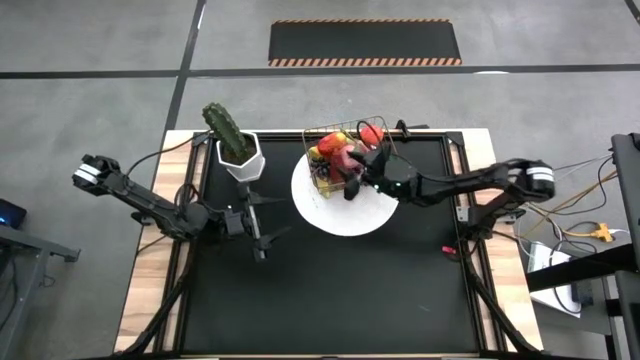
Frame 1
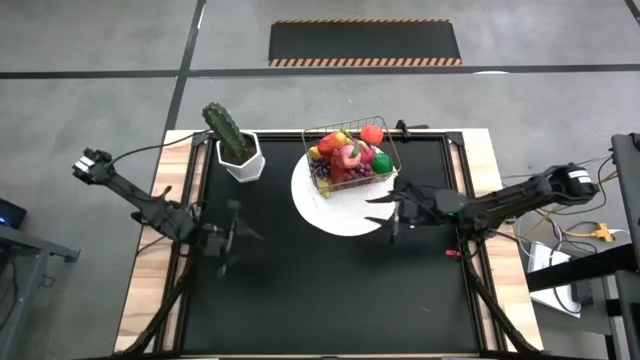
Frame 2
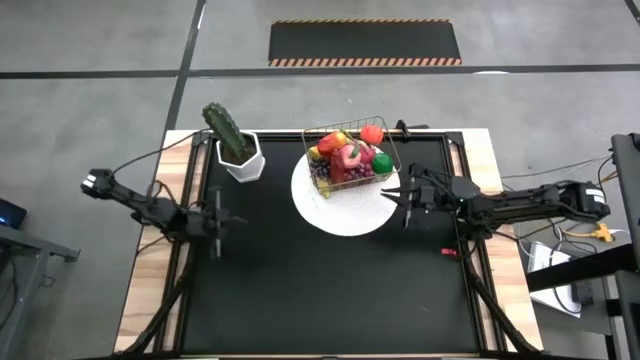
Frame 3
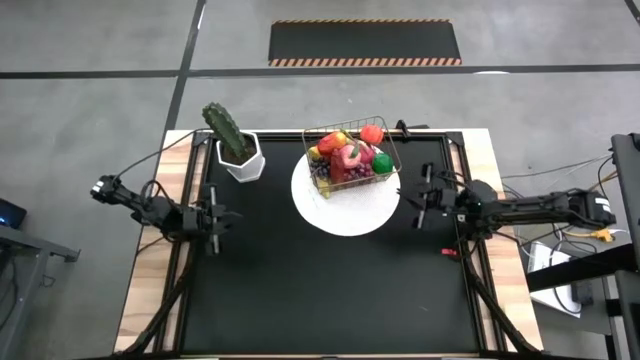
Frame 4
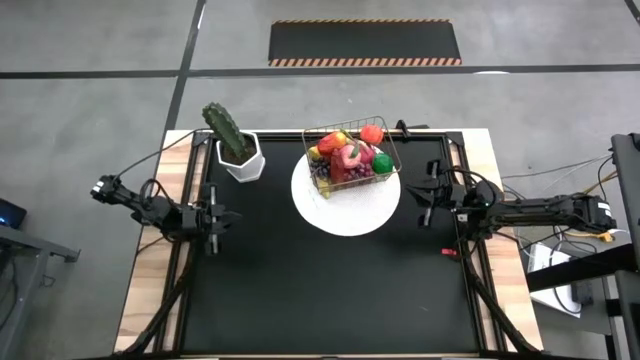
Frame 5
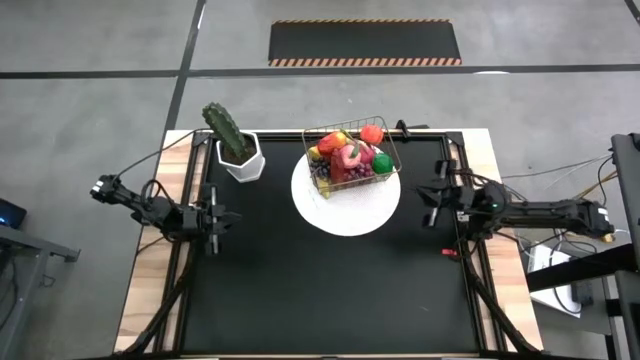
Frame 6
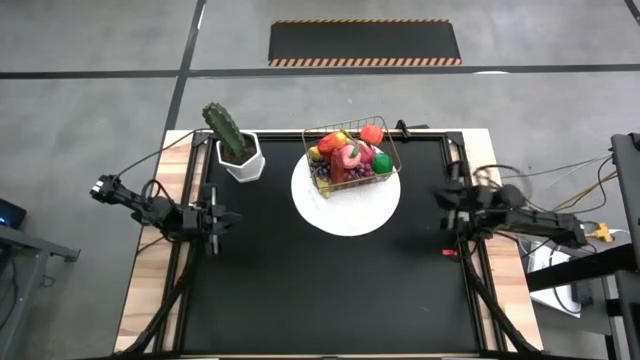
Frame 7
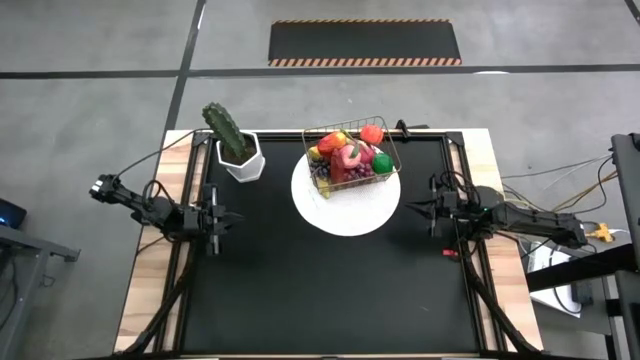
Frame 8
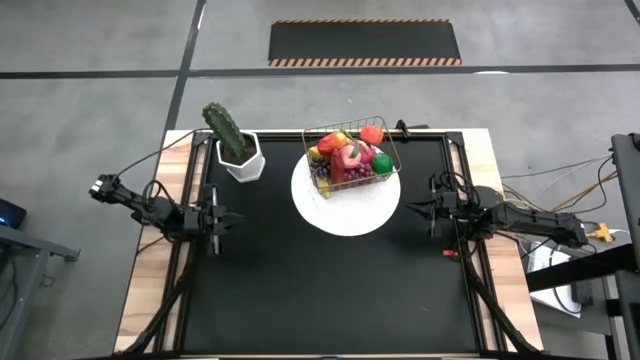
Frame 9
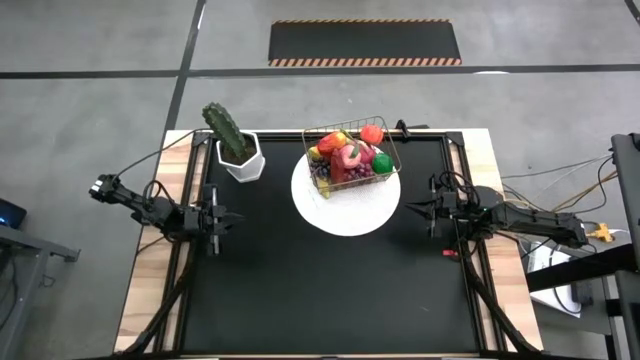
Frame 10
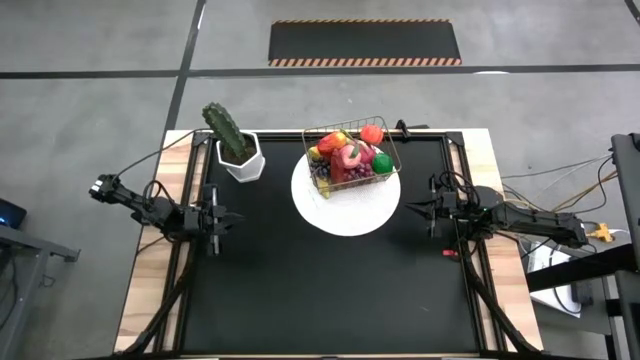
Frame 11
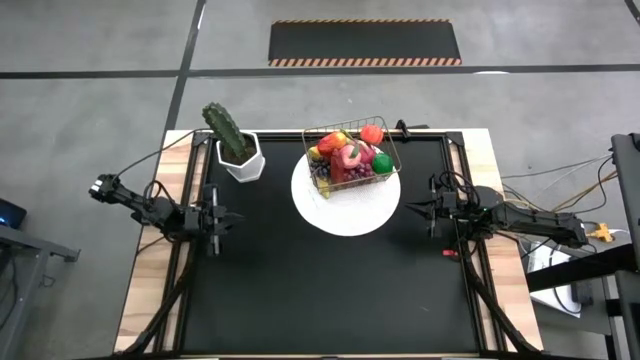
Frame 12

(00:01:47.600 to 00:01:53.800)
Task: Build produce basket
Return to Home Position

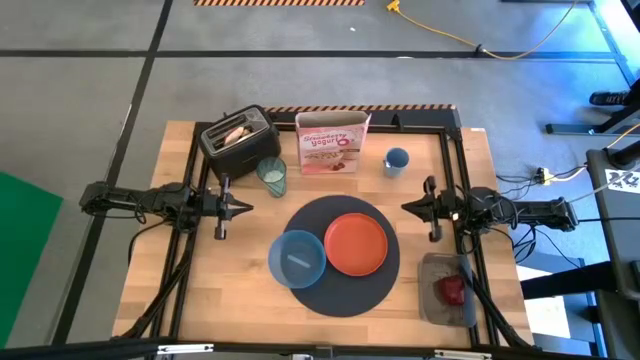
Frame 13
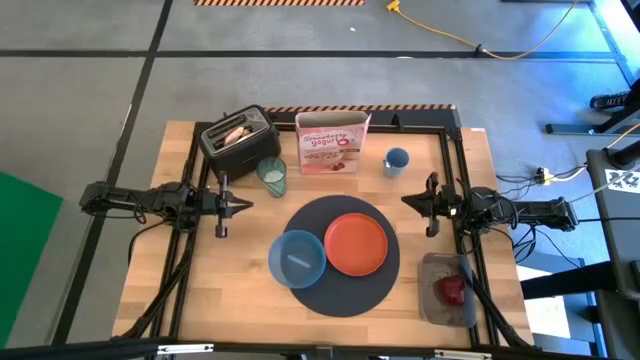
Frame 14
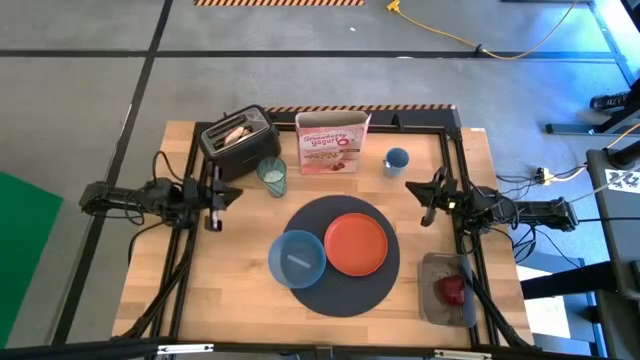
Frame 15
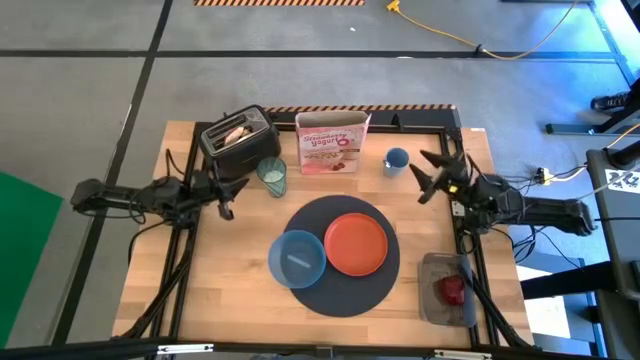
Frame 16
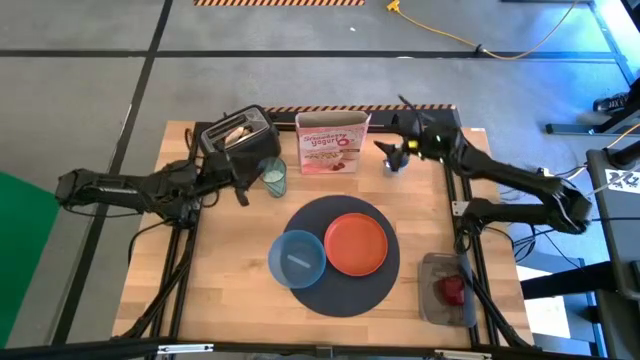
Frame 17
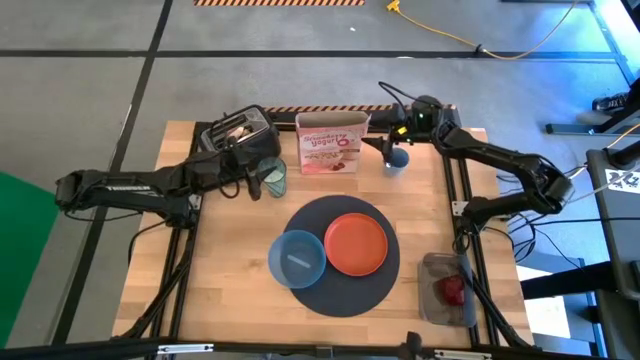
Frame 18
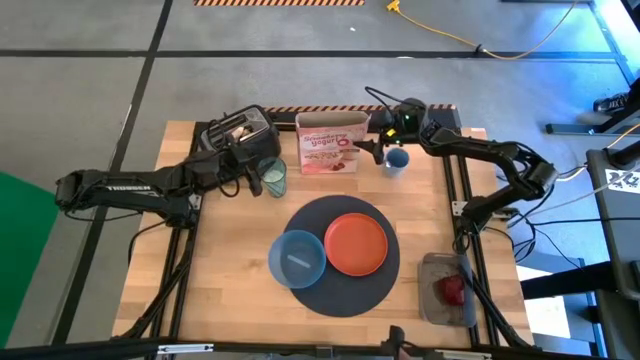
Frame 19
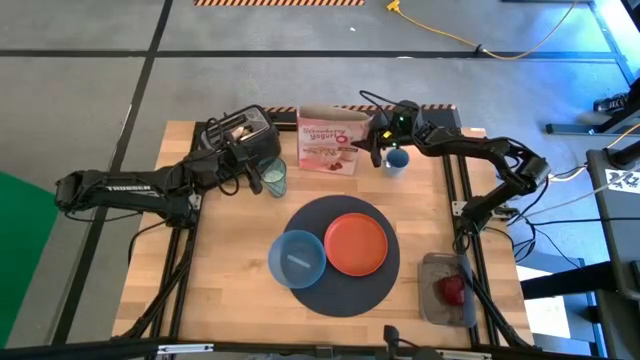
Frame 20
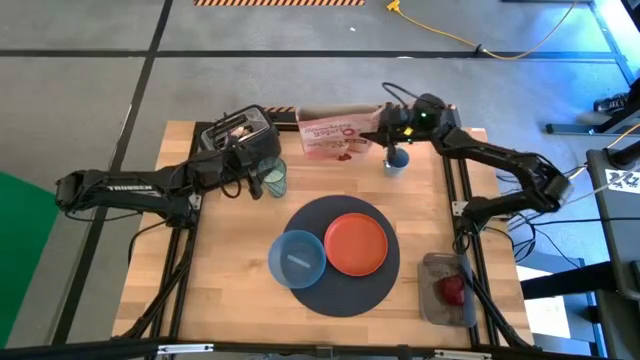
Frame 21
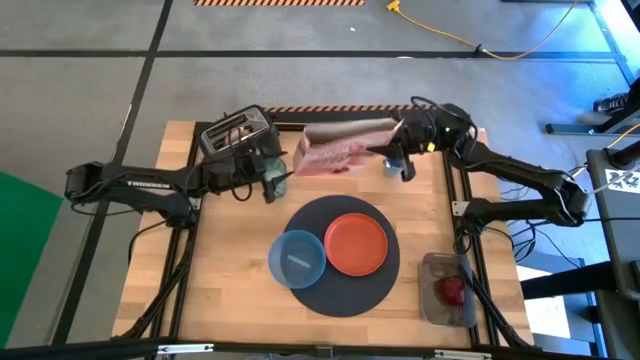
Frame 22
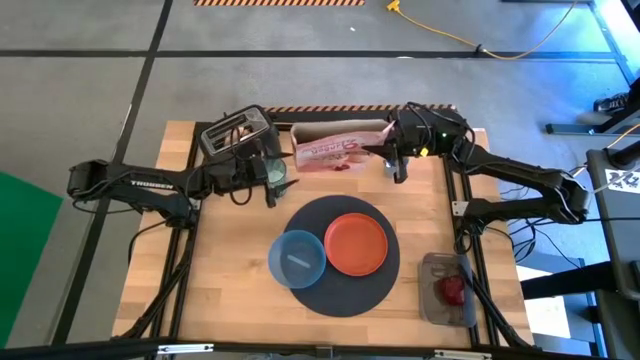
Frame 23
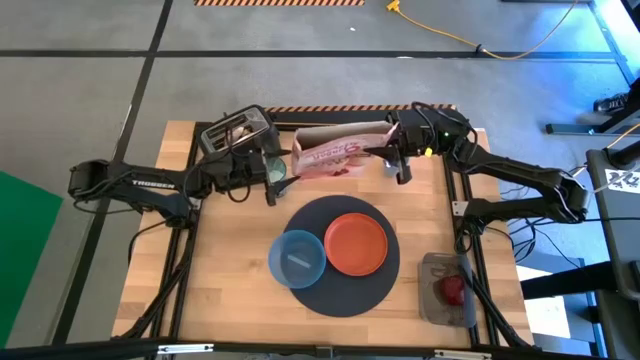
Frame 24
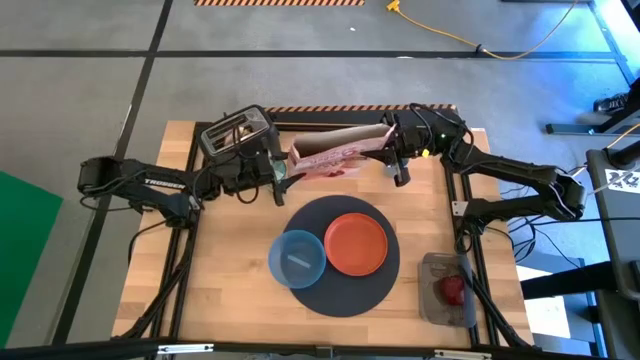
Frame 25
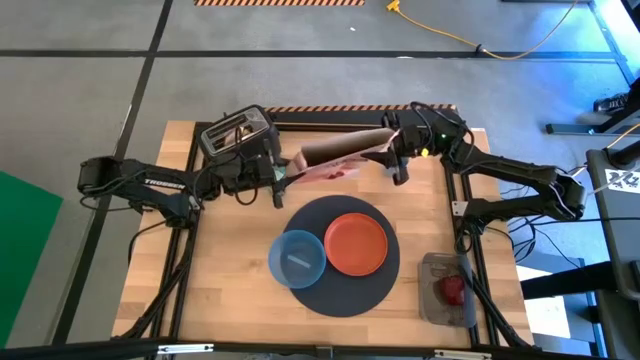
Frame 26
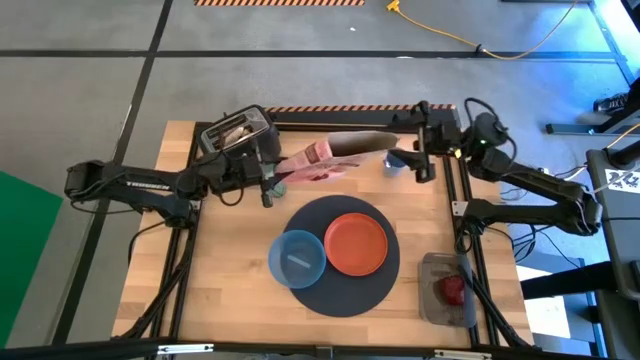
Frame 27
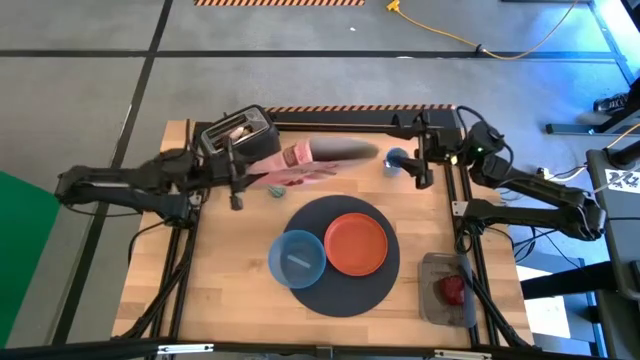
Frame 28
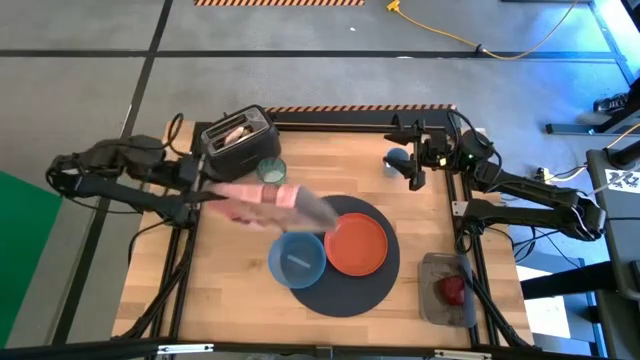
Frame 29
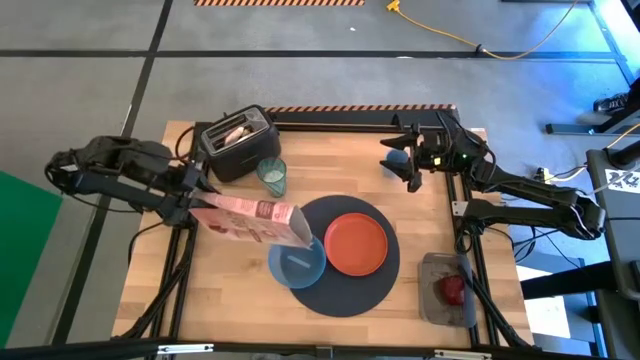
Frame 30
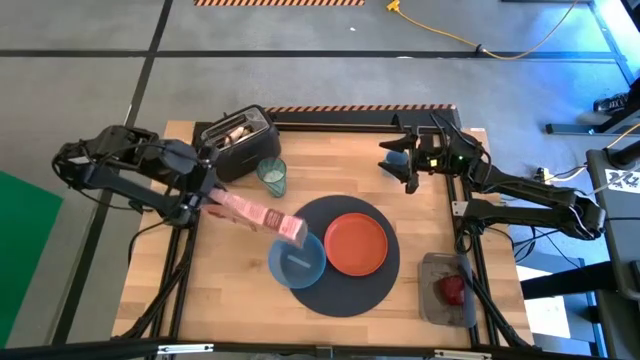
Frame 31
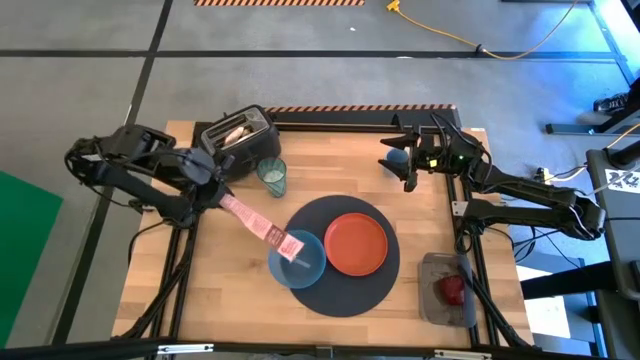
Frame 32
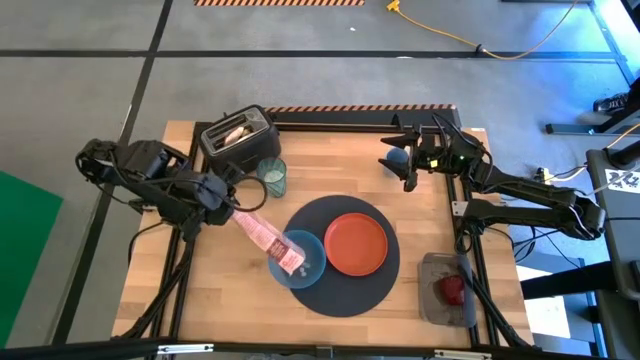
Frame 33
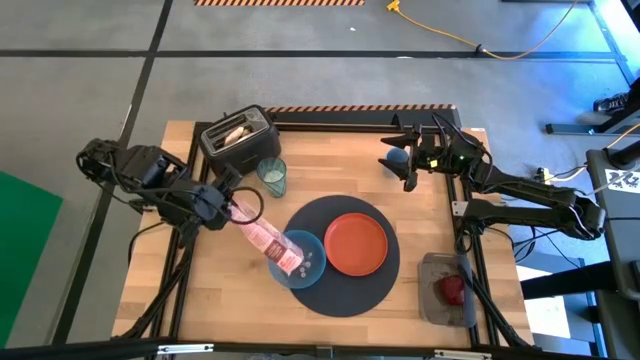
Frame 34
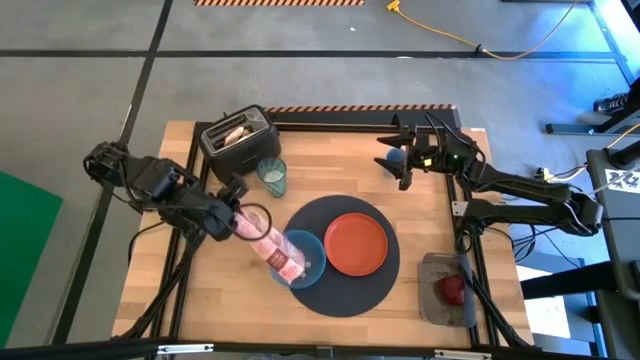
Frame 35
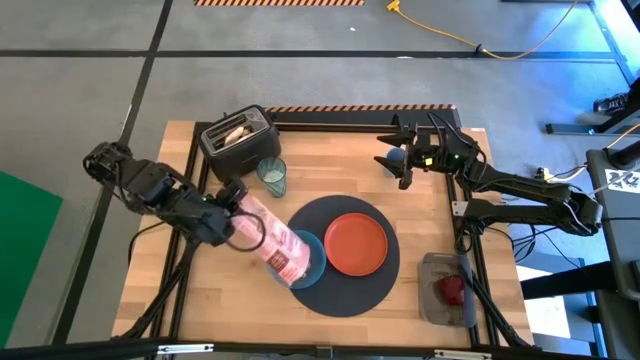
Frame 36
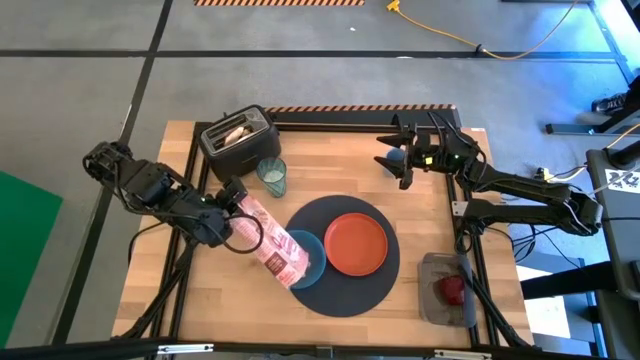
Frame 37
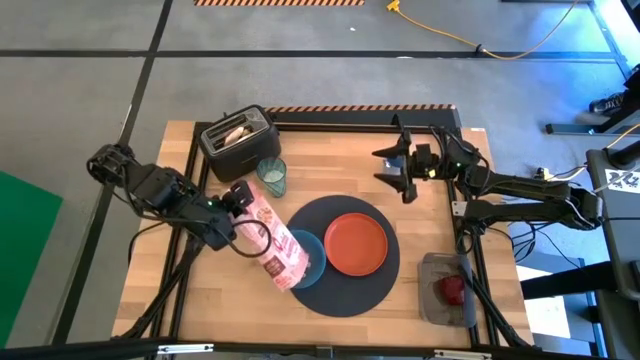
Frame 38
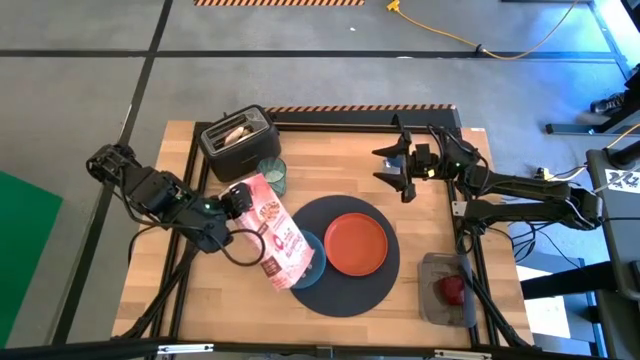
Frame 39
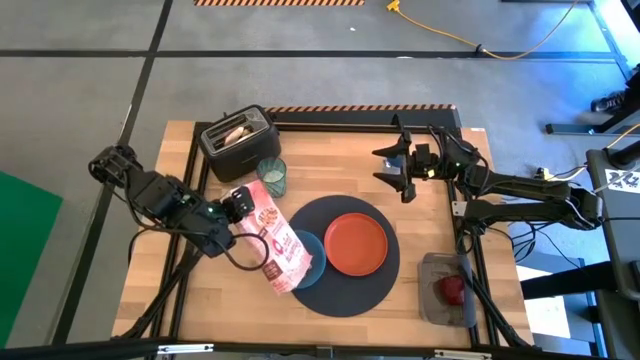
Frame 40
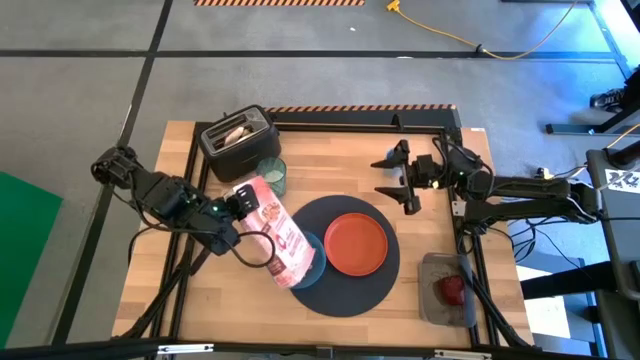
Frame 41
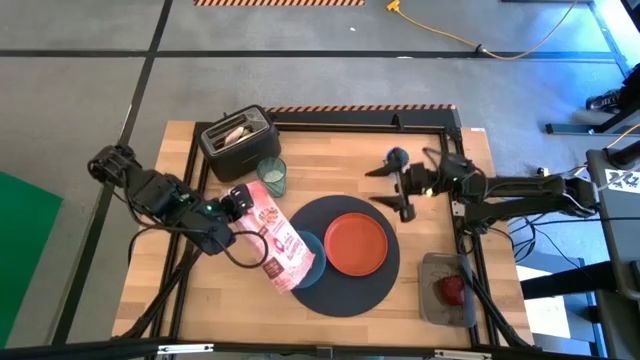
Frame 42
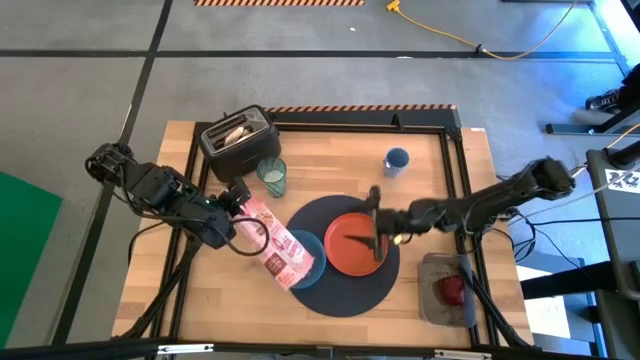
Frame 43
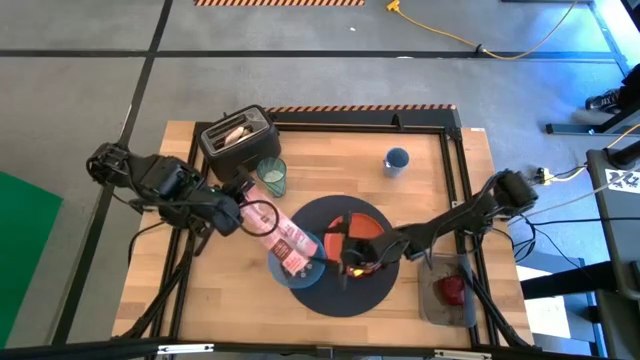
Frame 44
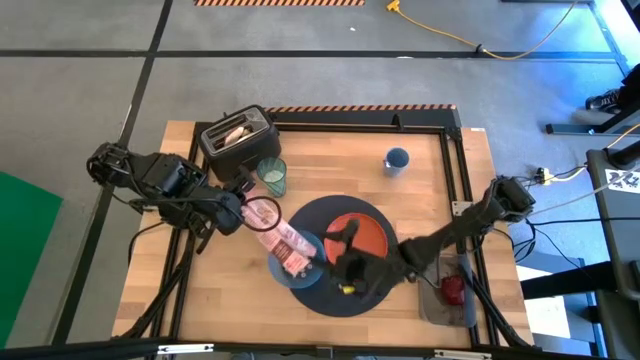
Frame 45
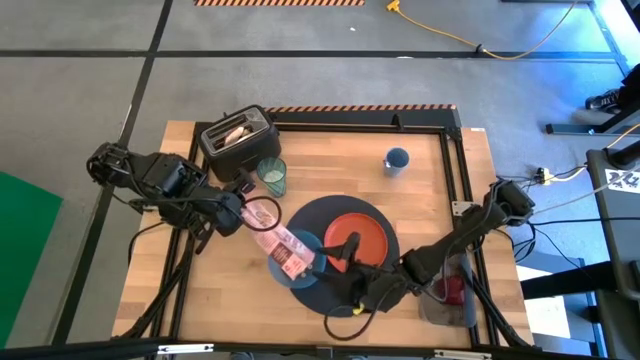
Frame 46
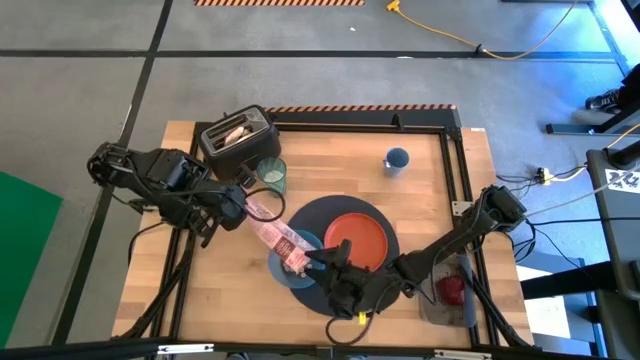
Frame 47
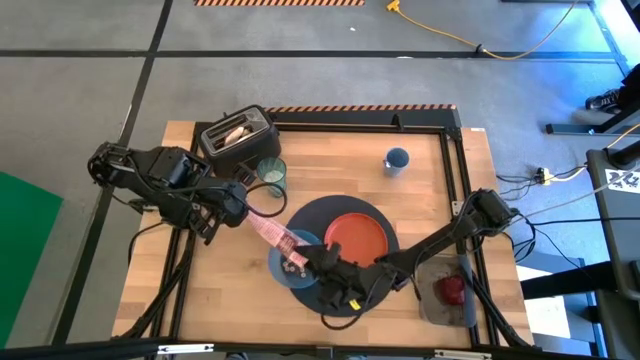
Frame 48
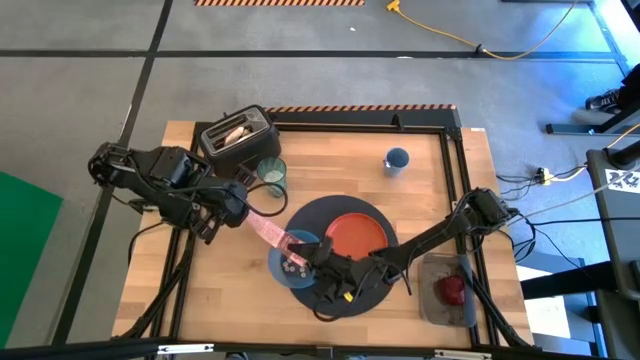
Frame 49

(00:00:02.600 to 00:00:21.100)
Task: Arrange a breakfast setting
Pour the cereal from the cereal box into the bowl
